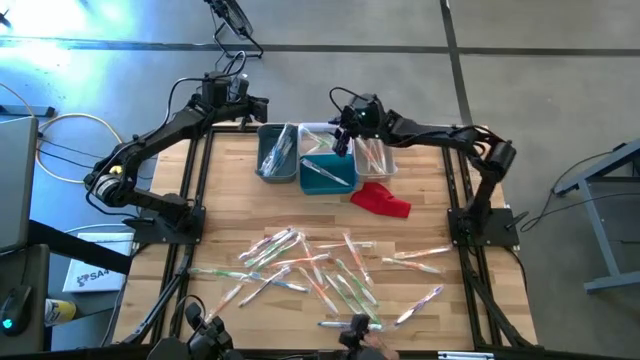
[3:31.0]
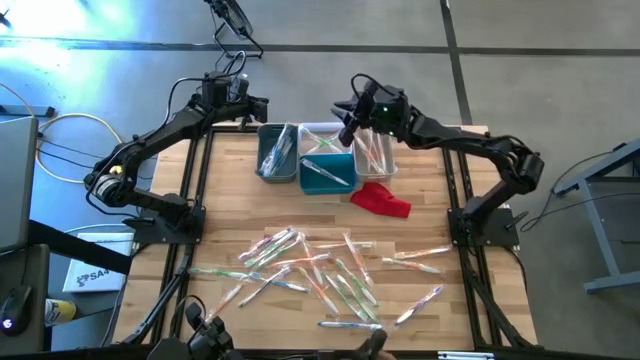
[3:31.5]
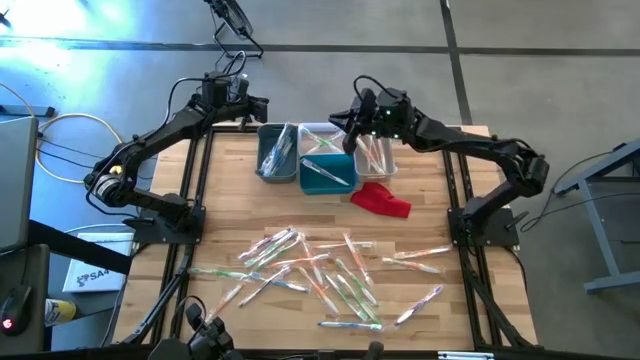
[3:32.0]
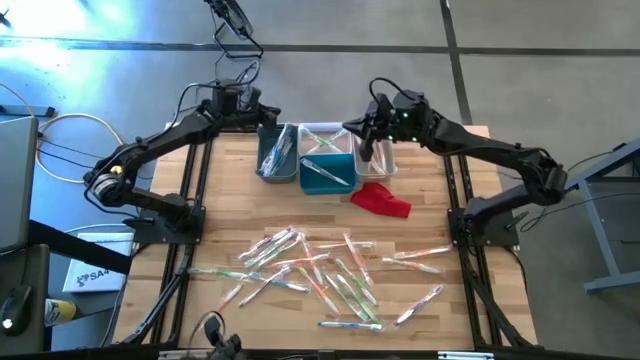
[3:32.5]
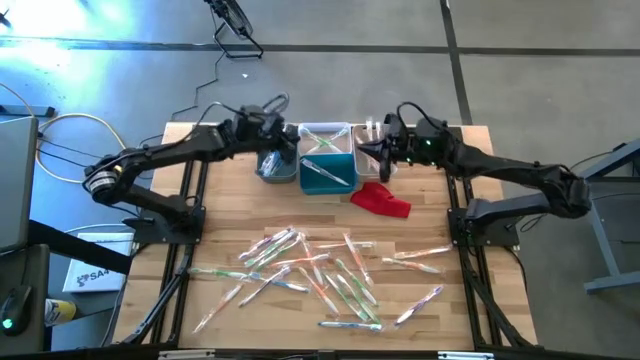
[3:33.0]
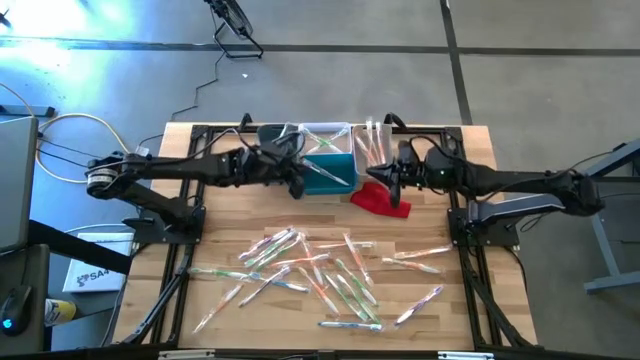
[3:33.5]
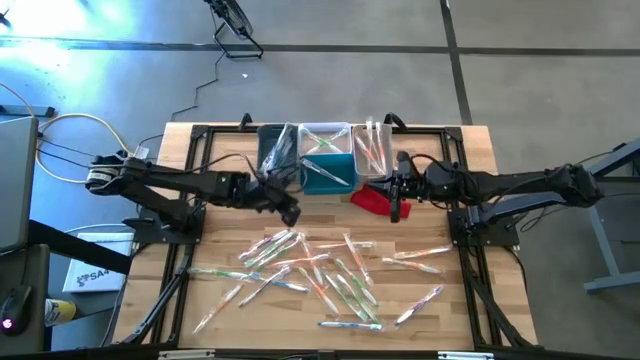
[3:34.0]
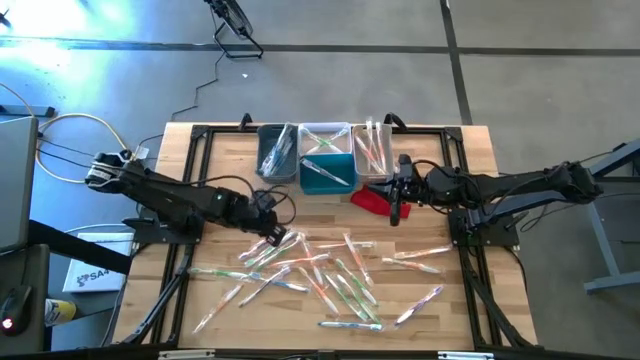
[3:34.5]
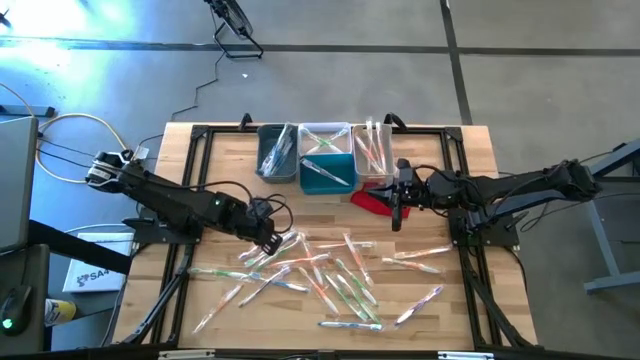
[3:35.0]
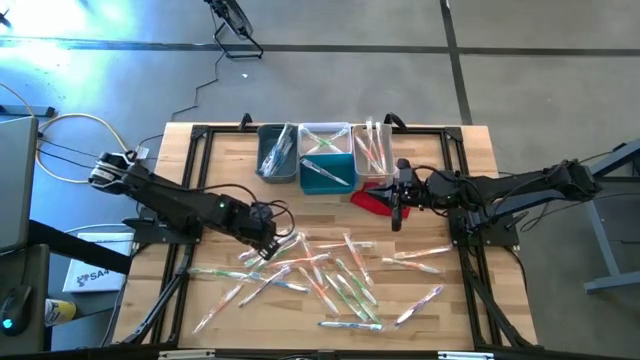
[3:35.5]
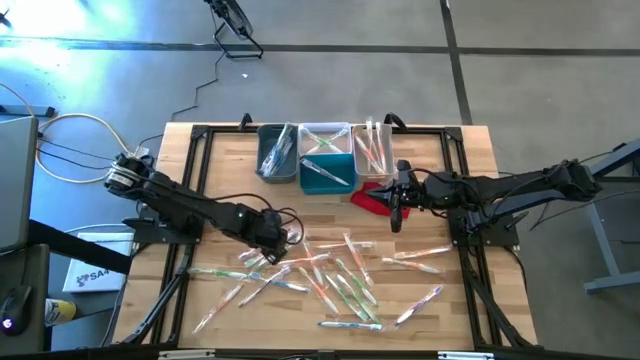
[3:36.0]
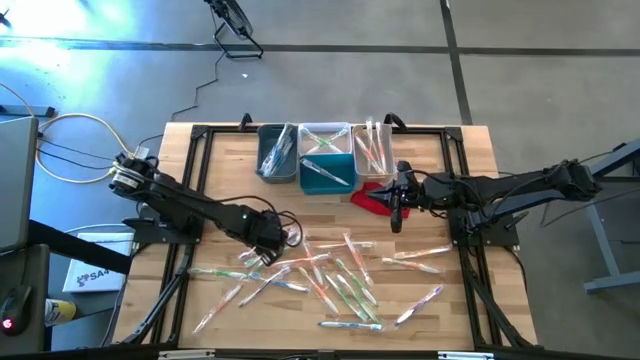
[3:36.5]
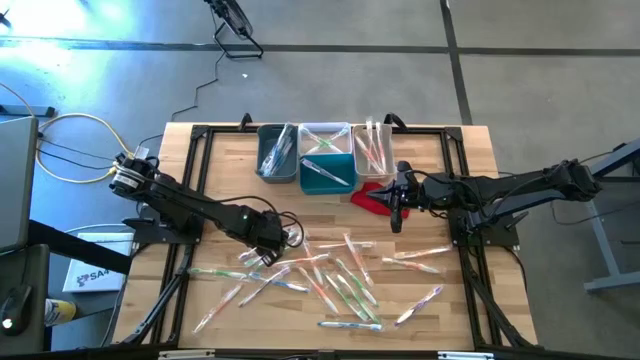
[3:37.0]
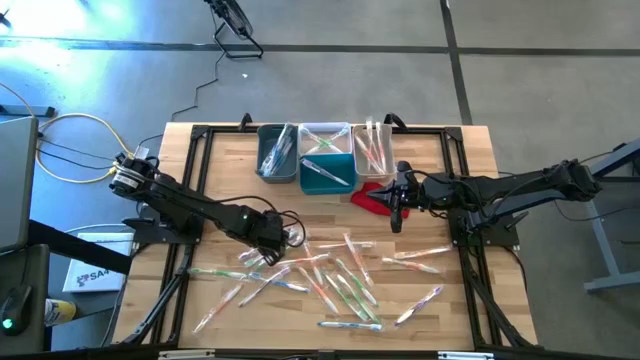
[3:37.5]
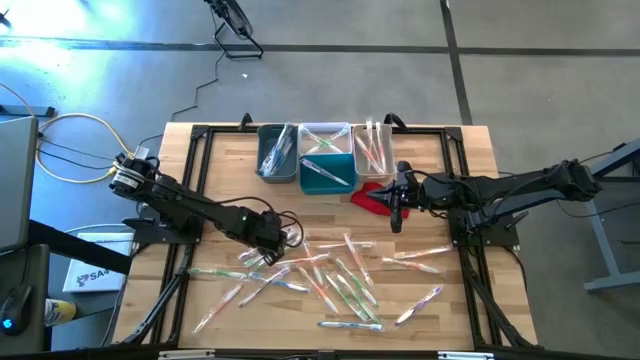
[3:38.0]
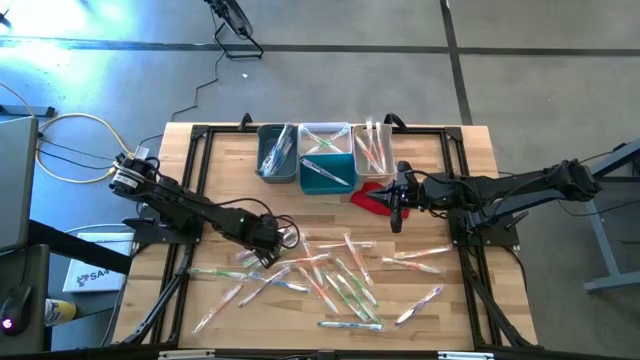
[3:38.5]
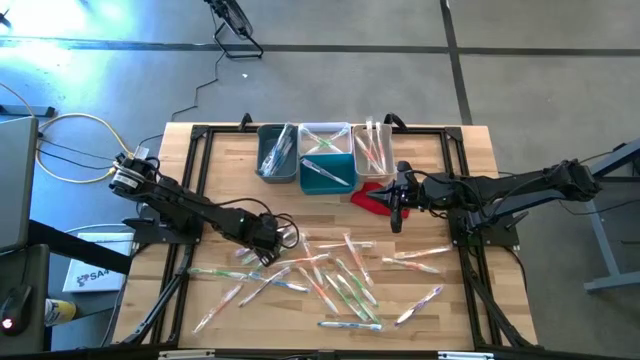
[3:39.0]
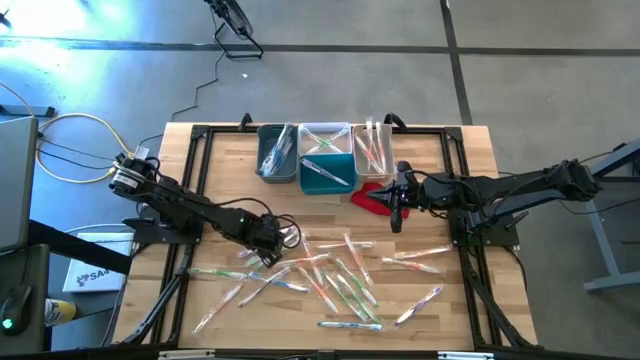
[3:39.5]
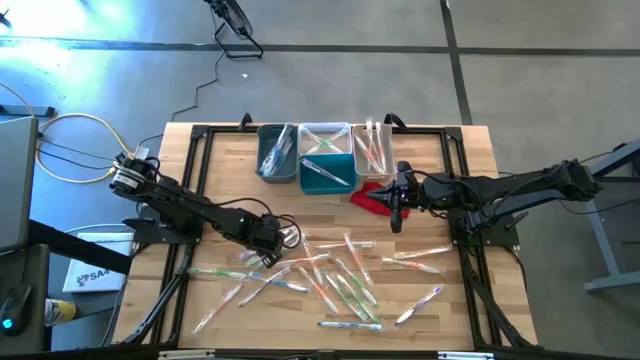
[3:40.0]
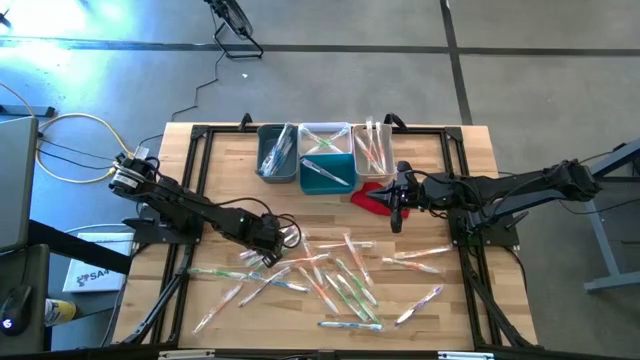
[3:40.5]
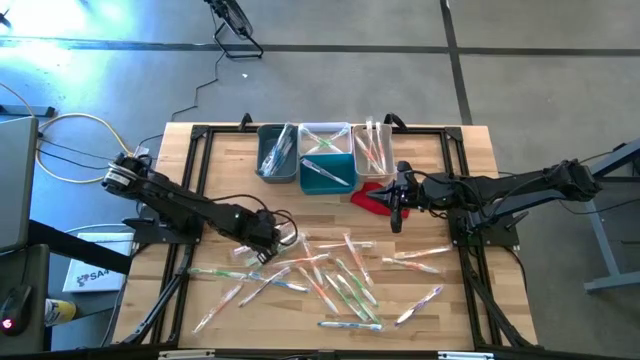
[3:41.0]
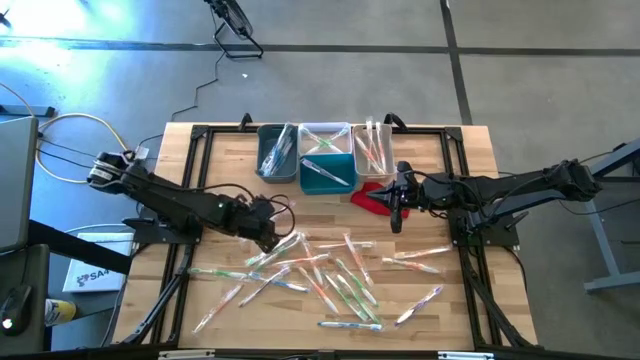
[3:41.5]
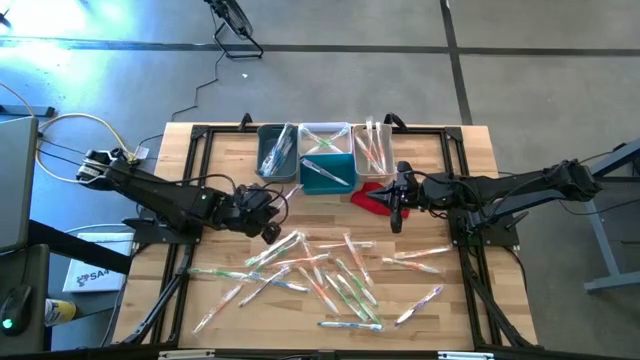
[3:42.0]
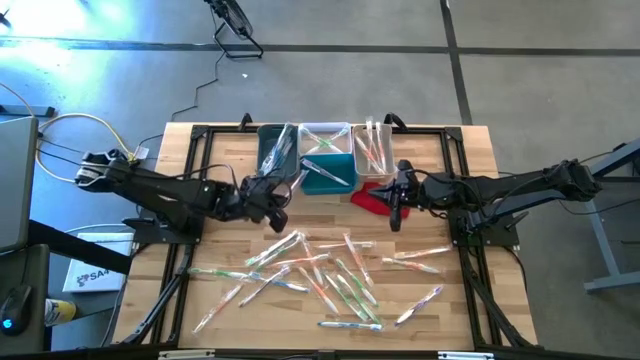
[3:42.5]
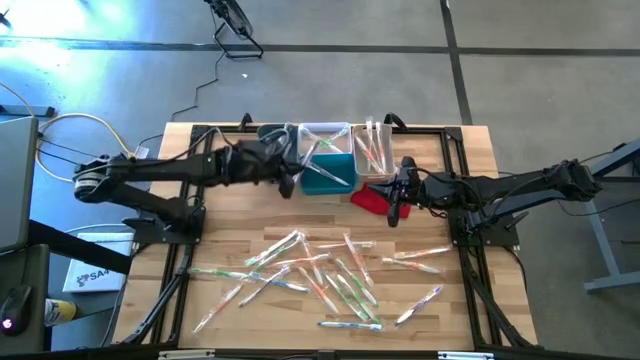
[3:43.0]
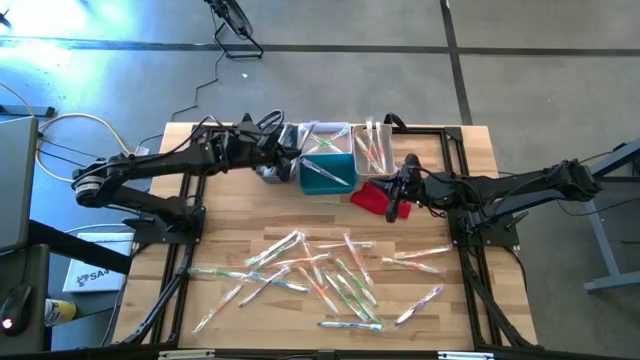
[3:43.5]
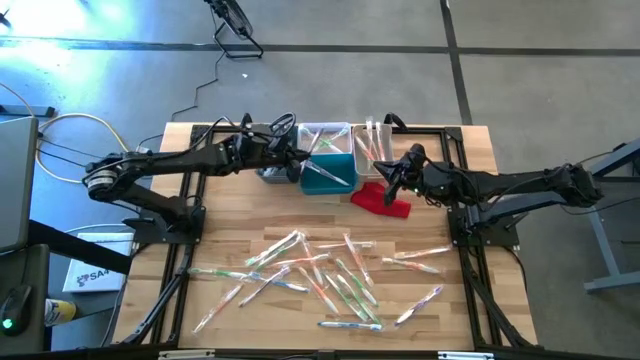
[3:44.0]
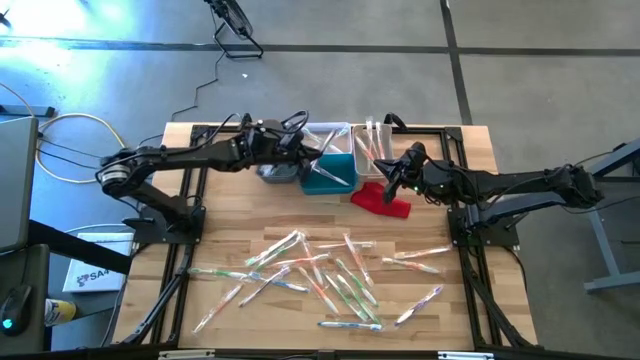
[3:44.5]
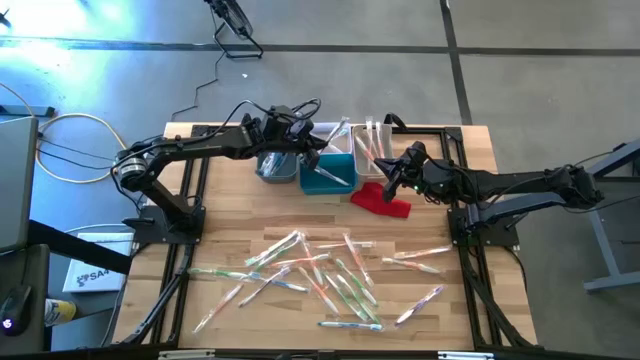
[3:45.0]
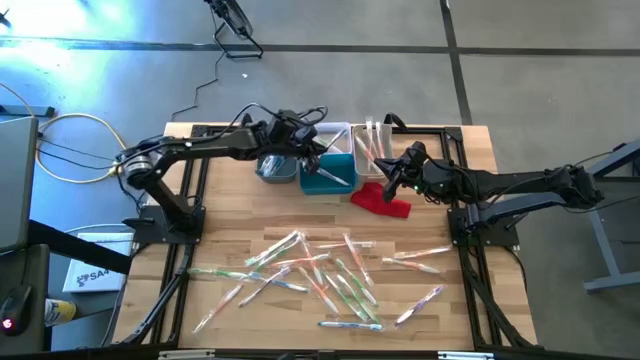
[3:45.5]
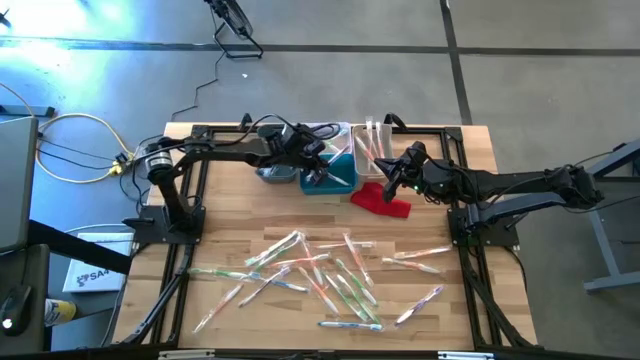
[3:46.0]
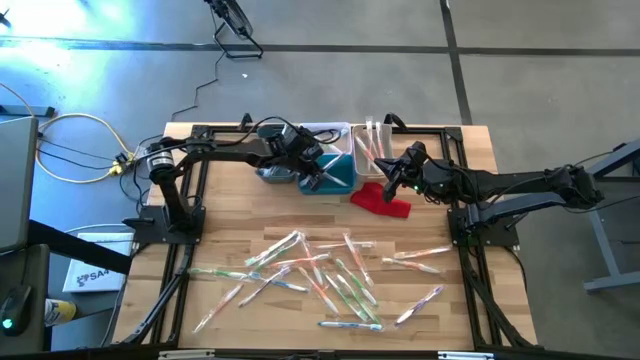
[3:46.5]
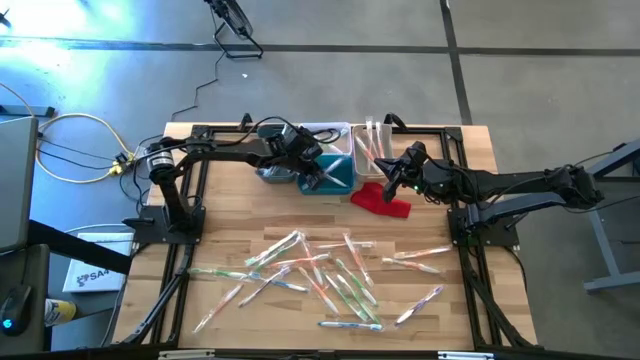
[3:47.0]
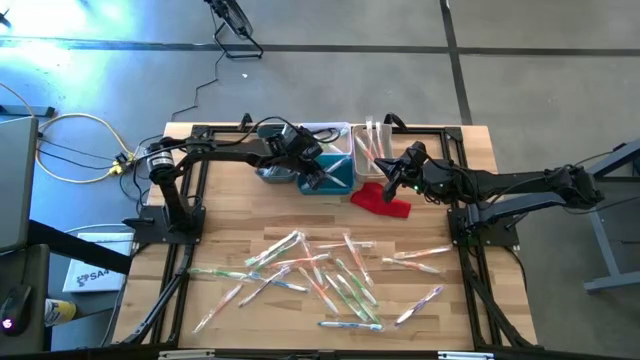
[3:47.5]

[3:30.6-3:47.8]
Task: Pick & Place Toothbrushes
Put the top left purple toothbrush into the blue bin

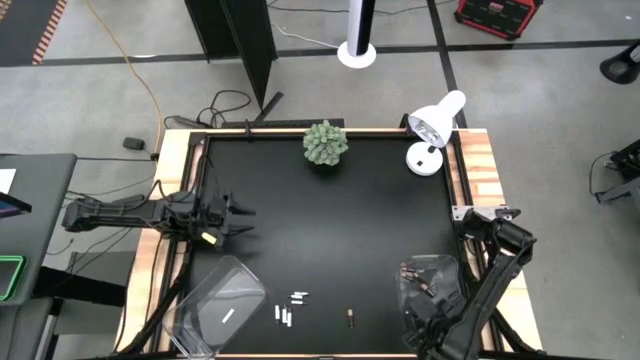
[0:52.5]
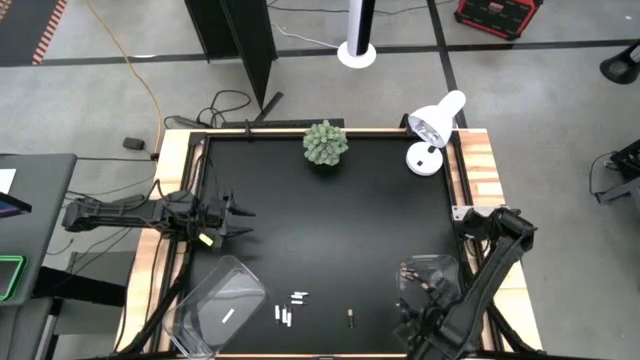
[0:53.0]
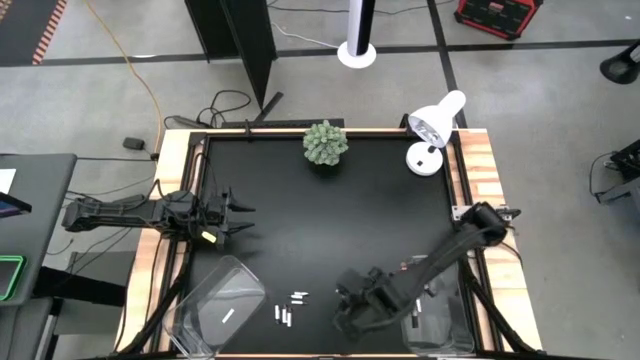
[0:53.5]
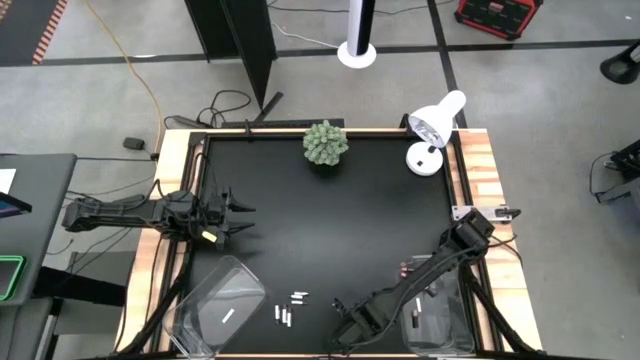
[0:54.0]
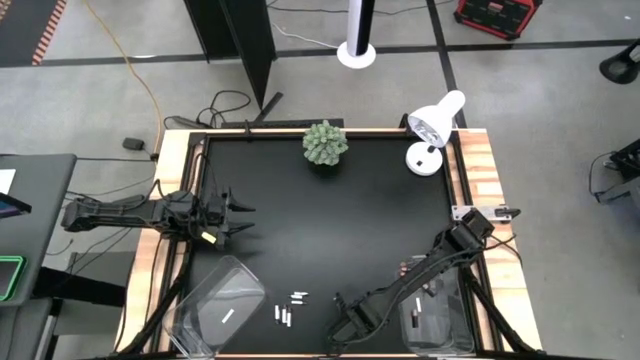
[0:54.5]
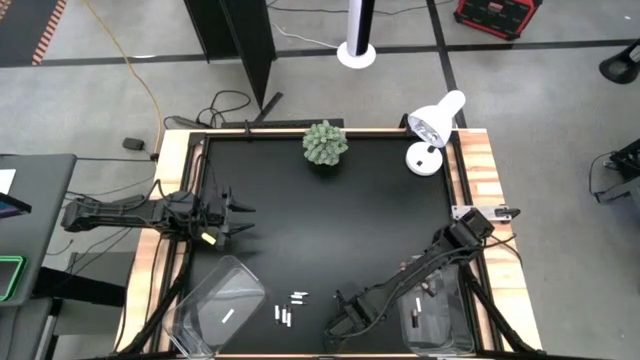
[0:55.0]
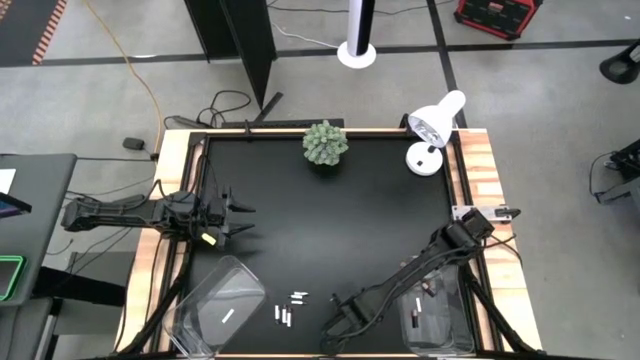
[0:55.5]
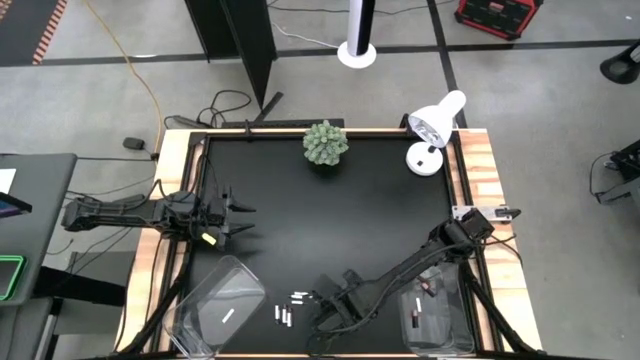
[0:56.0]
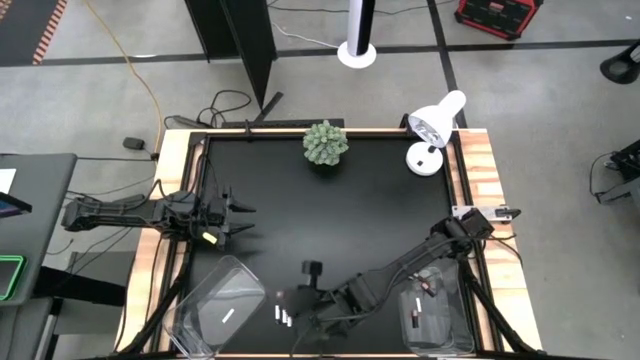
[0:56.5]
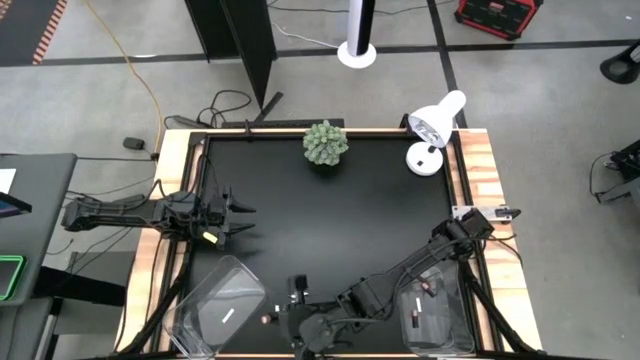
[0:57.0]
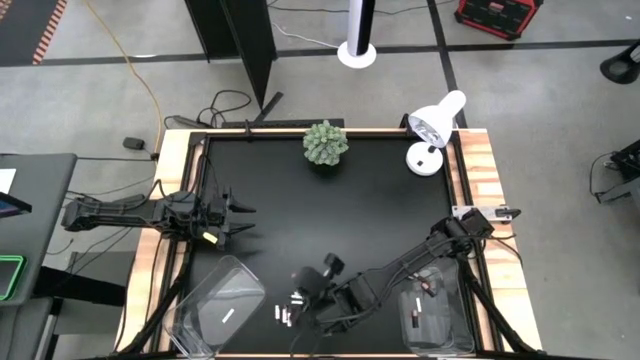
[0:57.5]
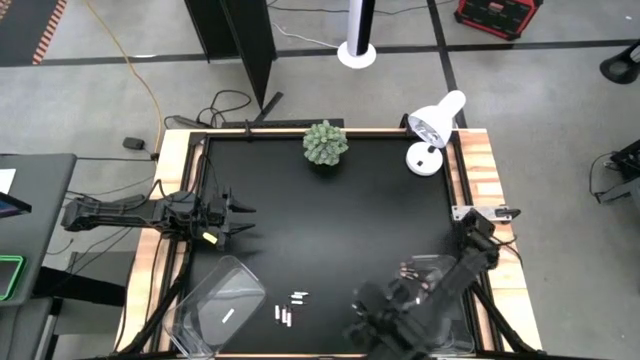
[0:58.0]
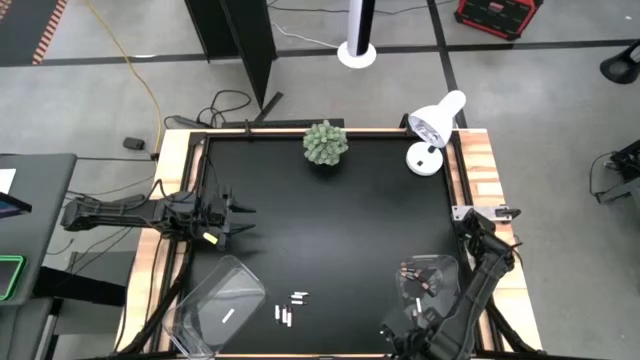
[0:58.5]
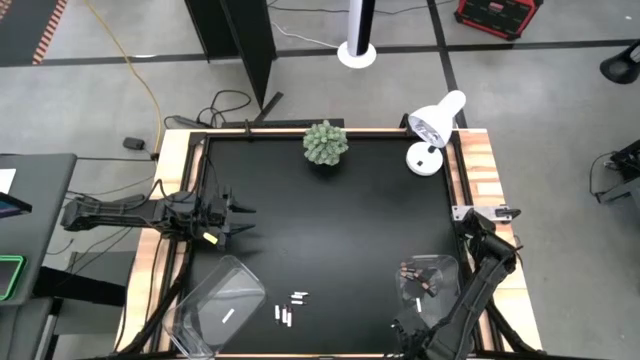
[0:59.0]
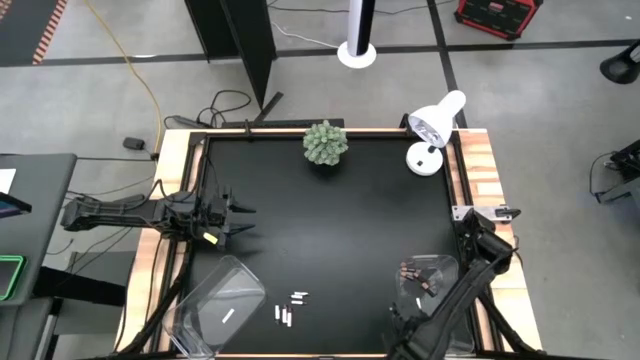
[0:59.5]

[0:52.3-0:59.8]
Task: Sort batteries
Put the black battery into the right transparent bin
